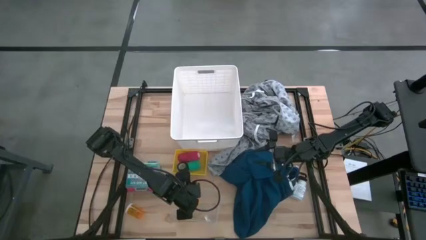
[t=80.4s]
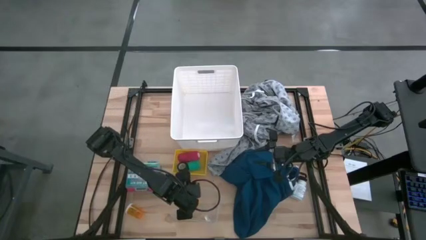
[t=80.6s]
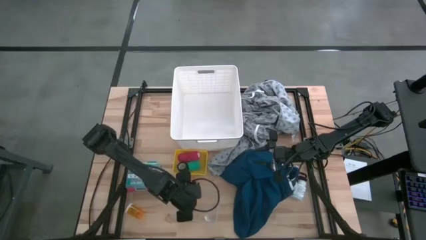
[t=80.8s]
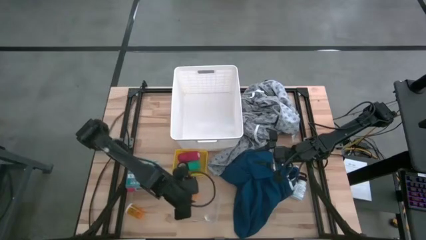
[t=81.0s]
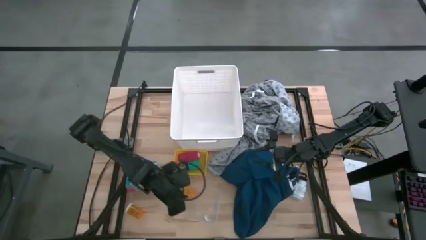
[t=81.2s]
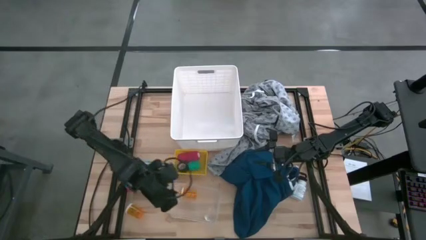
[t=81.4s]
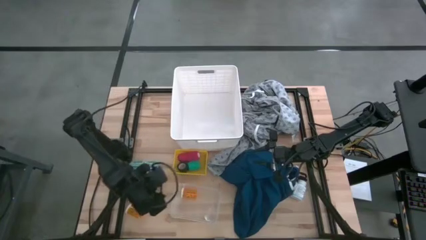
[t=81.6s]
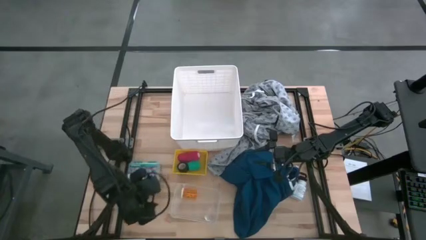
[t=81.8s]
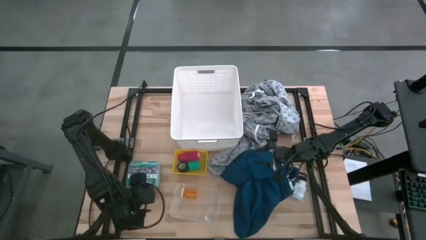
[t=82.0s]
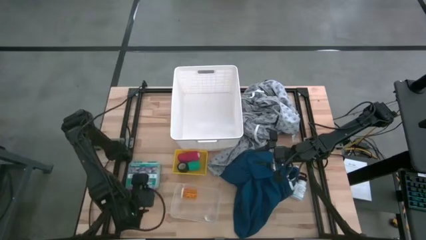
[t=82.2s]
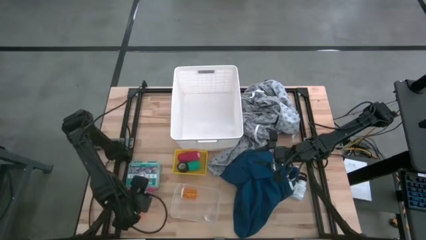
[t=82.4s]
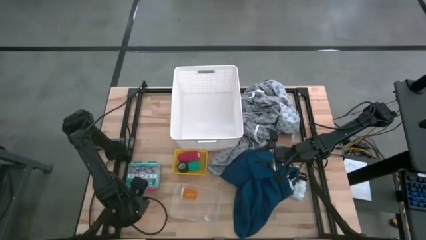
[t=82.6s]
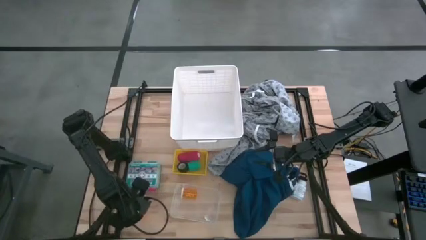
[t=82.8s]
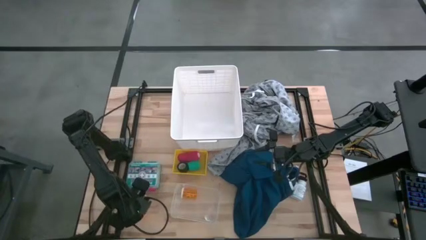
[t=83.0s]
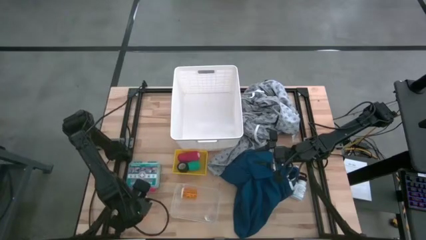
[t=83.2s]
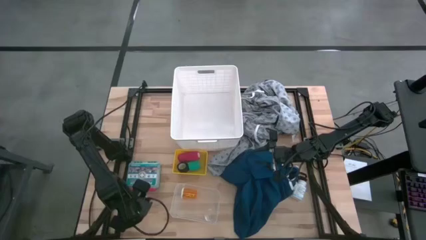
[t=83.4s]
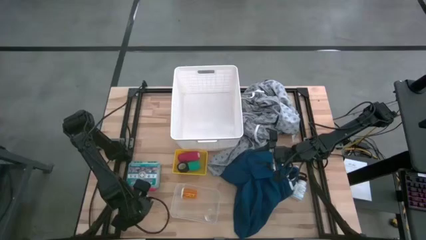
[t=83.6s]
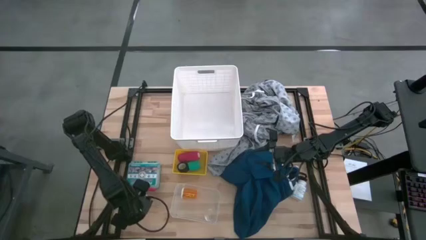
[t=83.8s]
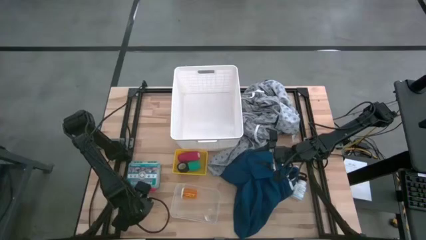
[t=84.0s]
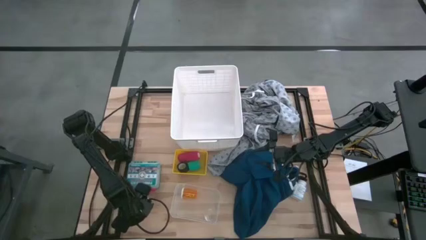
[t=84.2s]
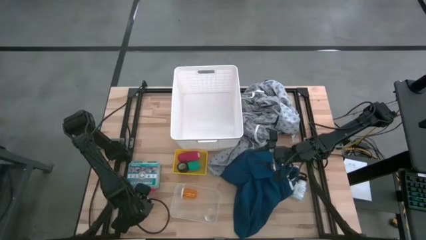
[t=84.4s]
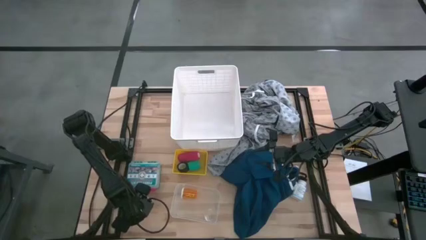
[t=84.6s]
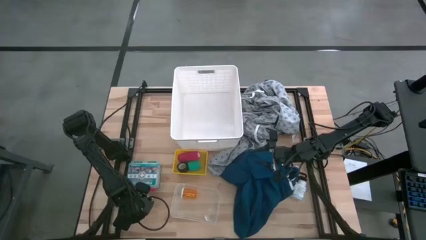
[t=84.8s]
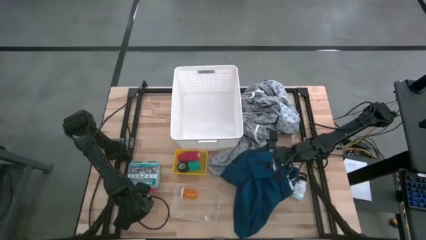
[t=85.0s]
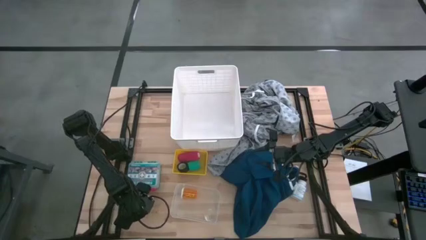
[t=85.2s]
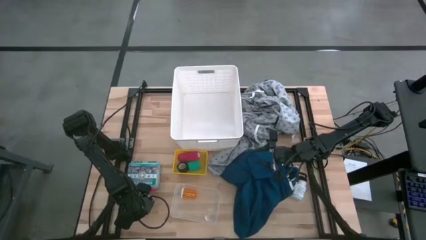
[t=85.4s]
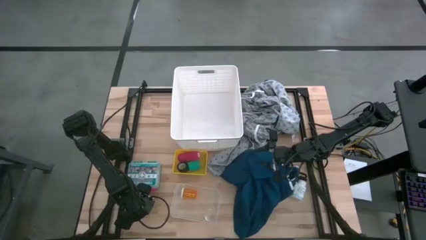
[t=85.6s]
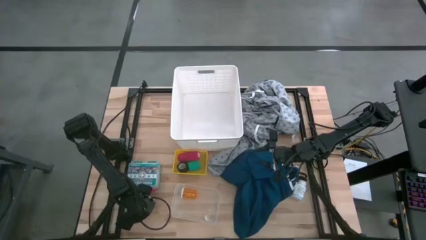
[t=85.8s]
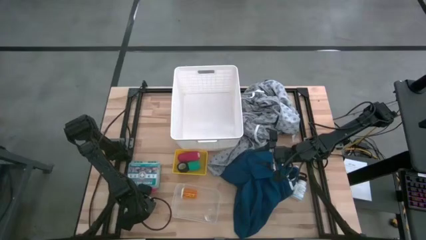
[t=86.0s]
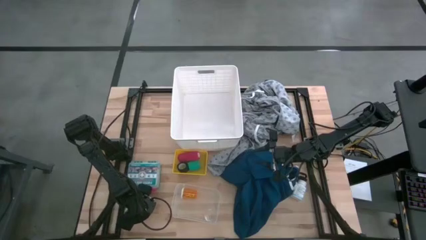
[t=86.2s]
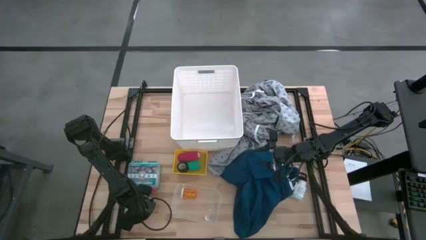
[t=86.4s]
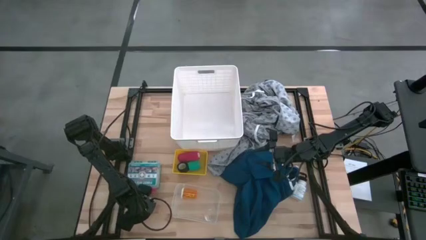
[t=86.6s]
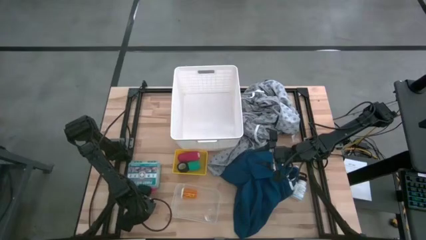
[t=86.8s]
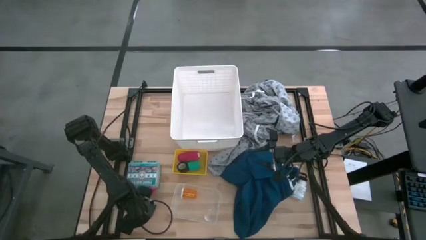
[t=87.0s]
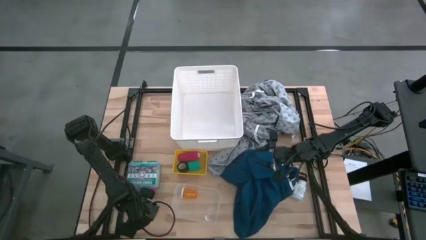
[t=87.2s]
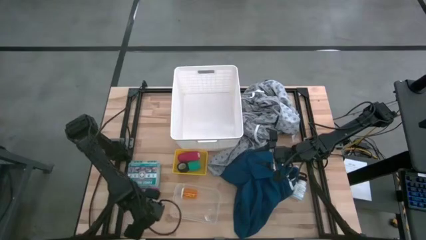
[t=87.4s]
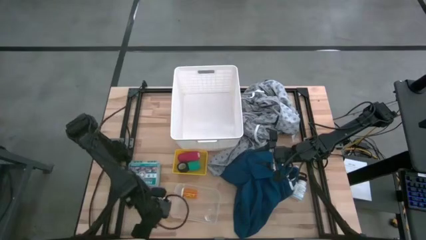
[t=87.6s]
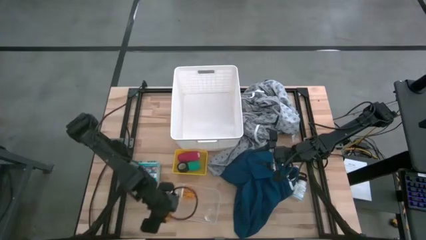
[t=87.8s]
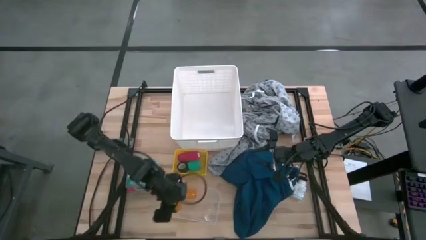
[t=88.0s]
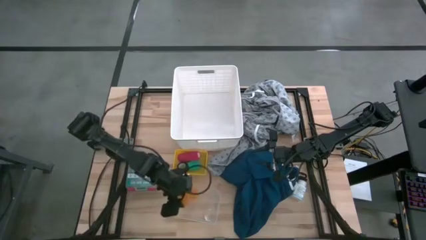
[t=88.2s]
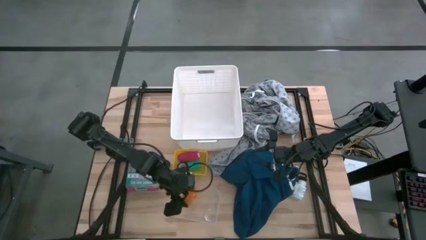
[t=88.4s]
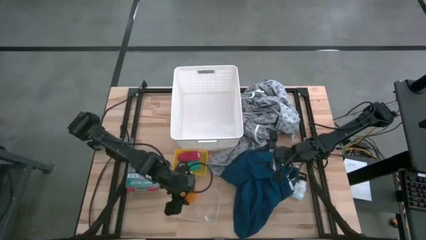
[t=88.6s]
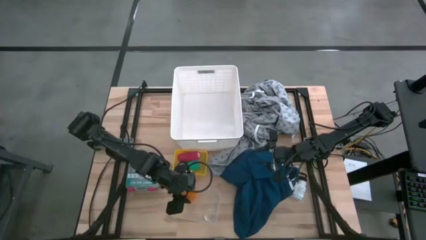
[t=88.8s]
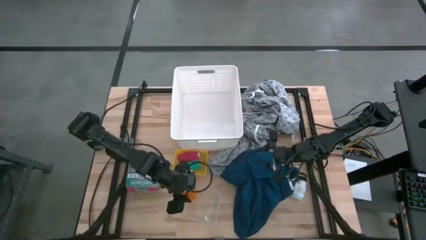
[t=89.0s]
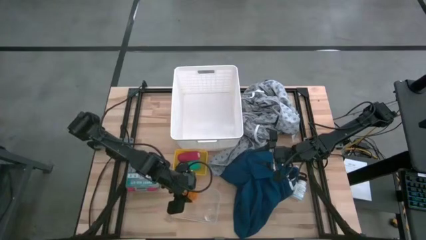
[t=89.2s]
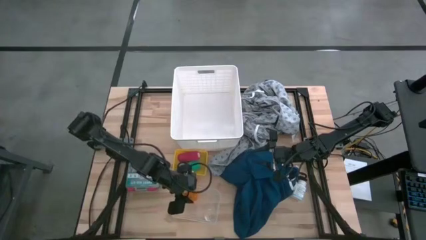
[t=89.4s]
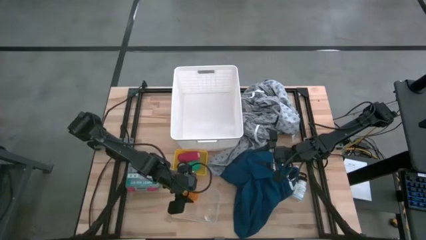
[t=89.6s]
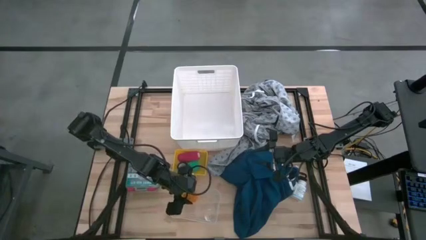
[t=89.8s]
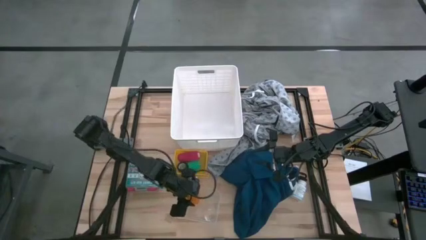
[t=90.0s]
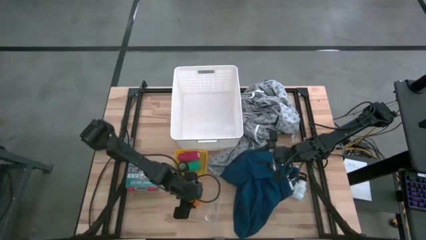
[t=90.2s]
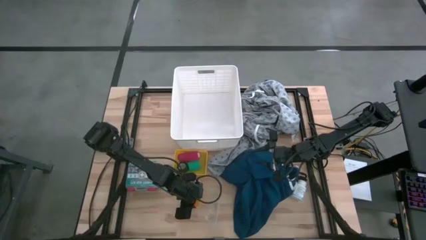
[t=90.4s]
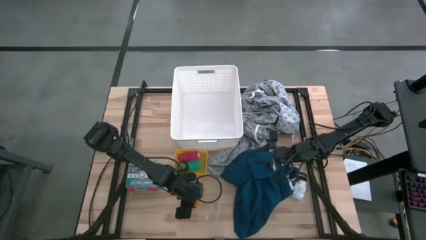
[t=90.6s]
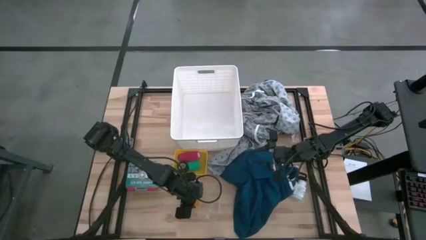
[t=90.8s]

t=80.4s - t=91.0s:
Task: Pick & Place Medicine items
Put the orange medicine bottle into the transparent bin

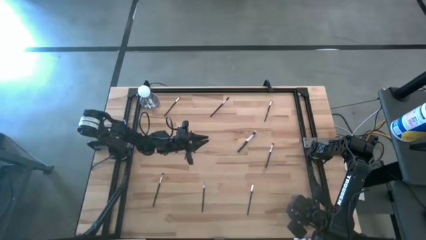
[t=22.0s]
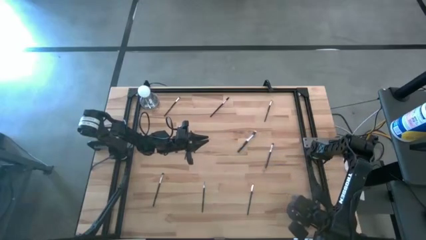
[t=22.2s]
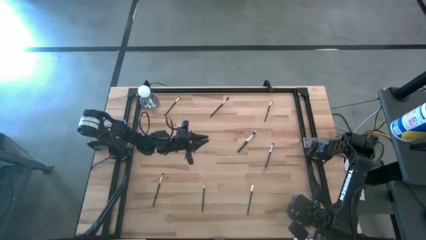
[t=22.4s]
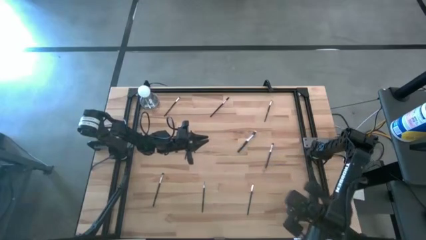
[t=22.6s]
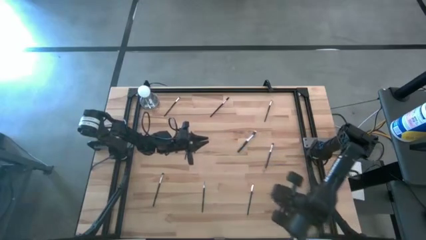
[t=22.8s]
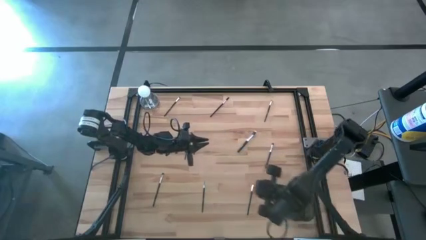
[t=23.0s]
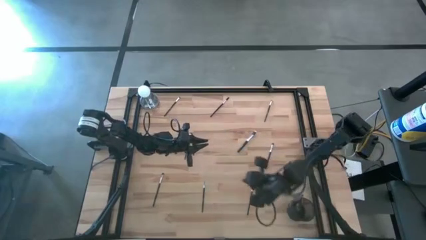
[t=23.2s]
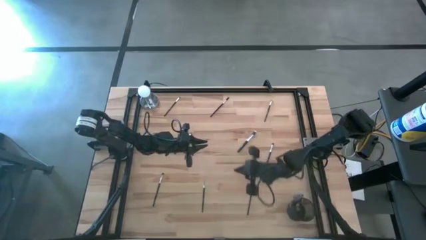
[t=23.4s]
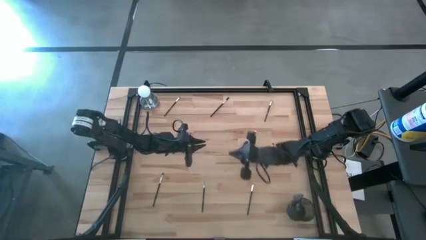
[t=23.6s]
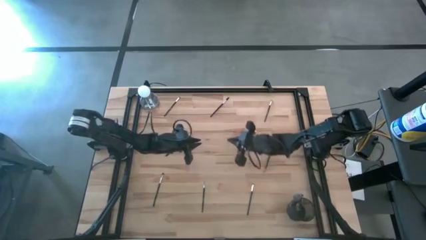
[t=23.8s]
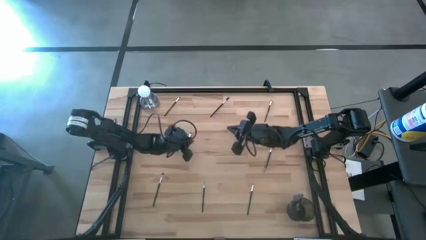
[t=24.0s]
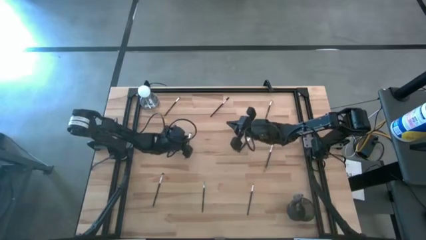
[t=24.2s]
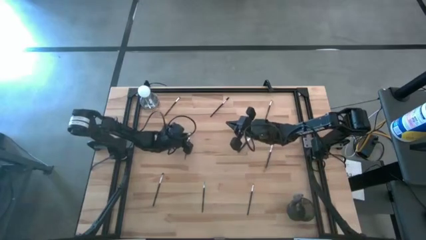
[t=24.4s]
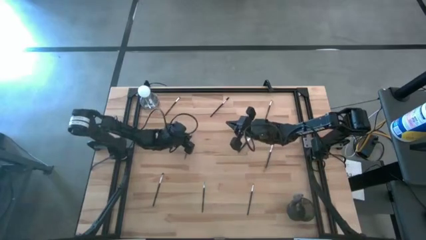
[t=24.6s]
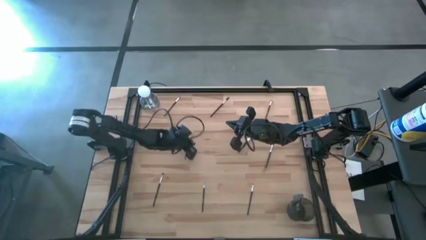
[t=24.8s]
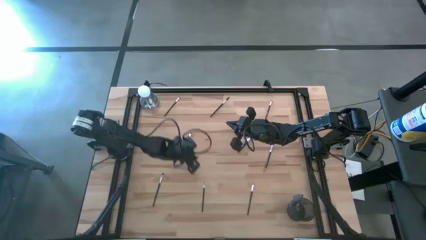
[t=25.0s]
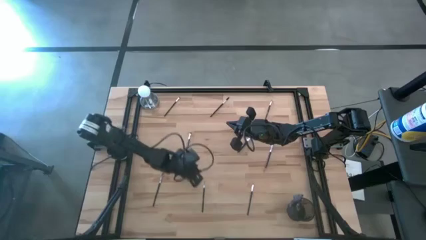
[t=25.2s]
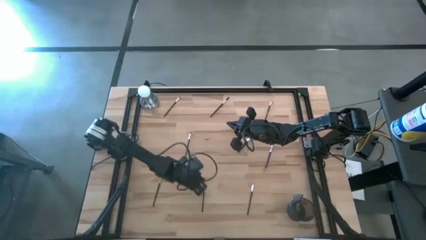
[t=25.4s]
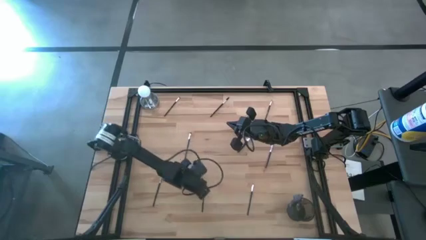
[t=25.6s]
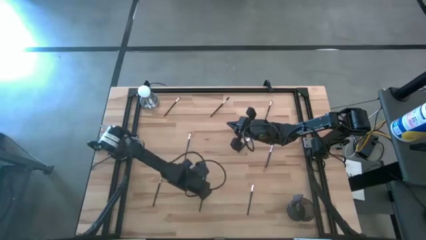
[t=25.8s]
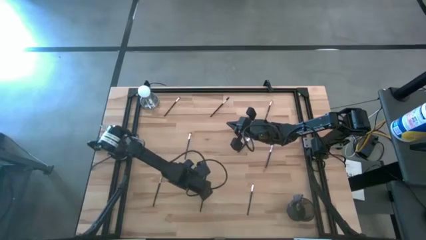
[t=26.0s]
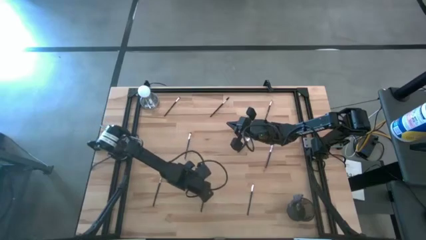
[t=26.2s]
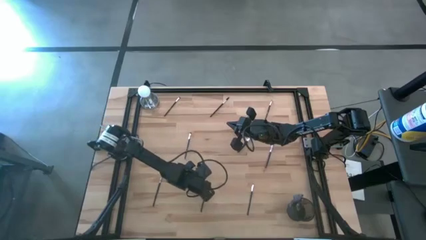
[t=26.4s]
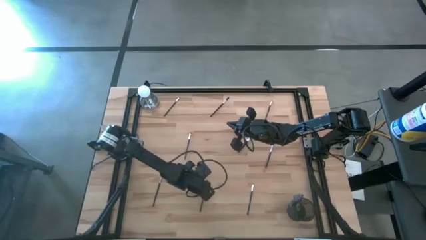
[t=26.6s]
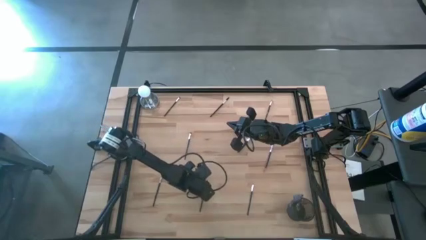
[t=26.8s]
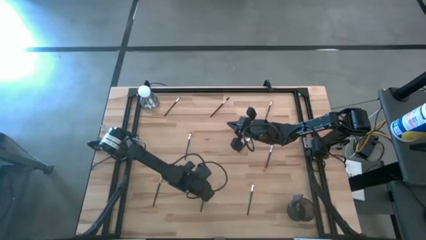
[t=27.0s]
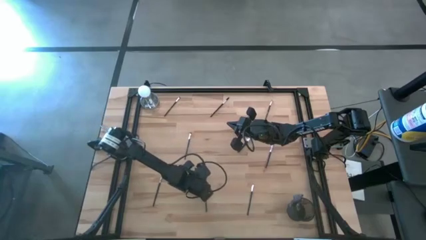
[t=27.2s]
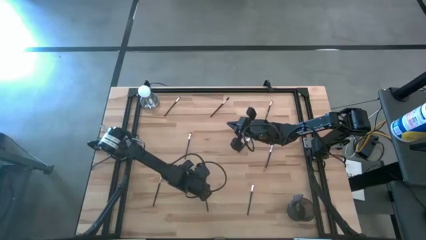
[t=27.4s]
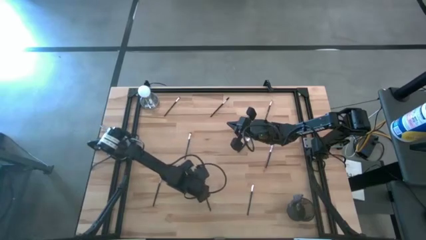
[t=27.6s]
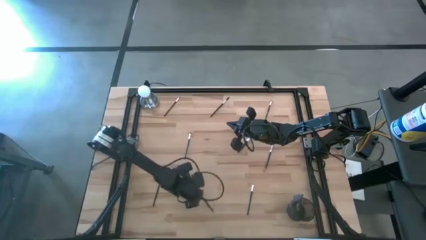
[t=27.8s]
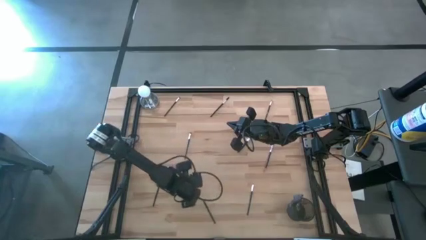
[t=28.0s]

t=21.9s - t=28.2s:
Task: Pick & Place Makeup Brushes
Put the black liner brush into the makeup holder
